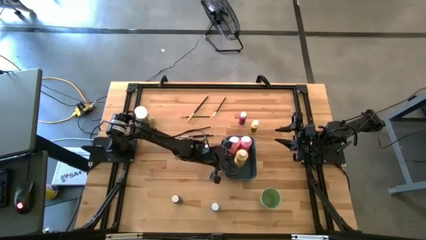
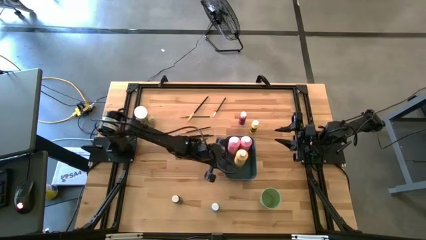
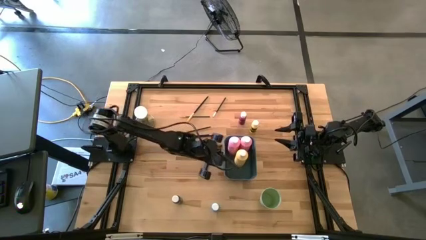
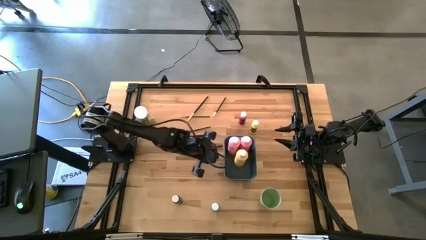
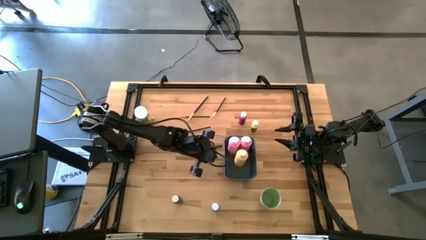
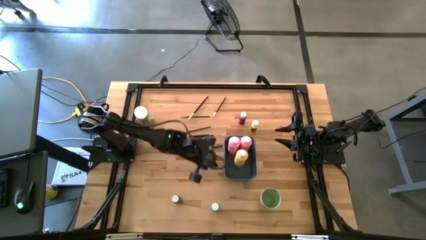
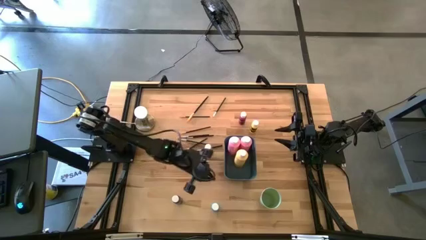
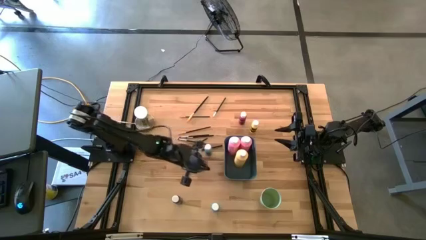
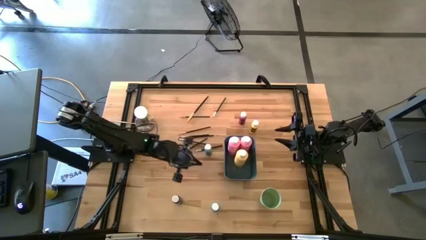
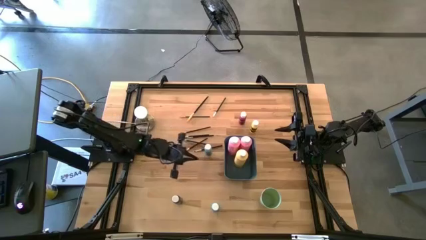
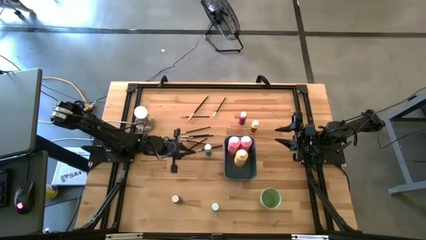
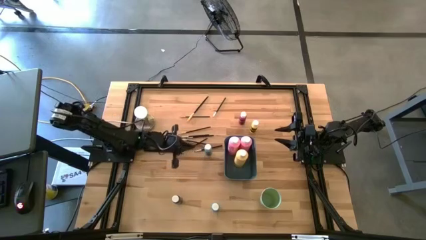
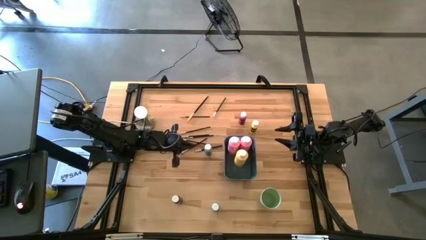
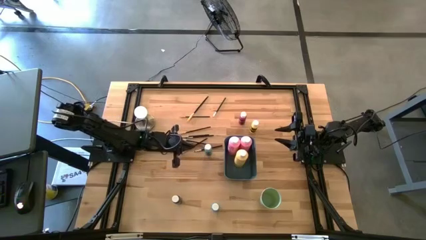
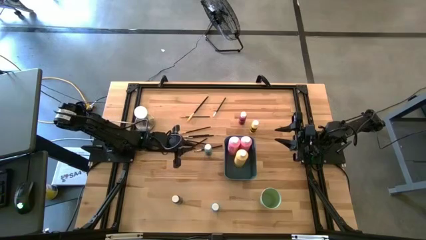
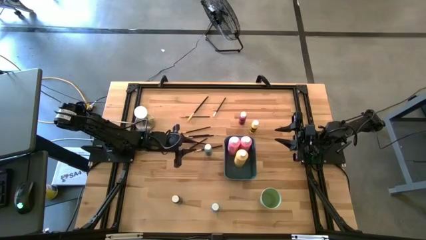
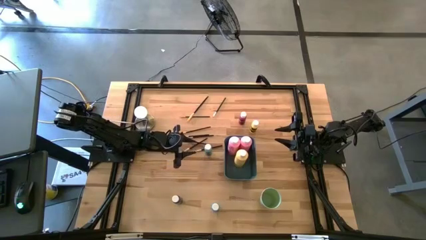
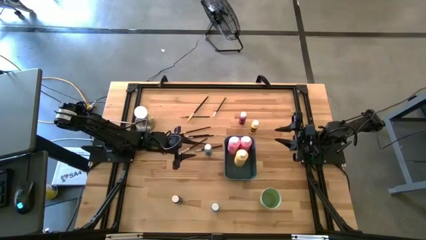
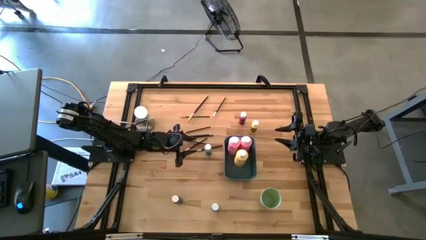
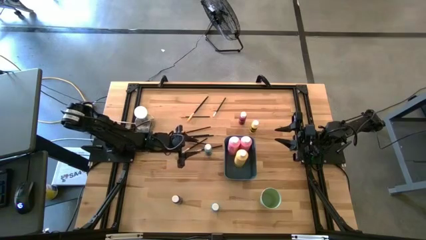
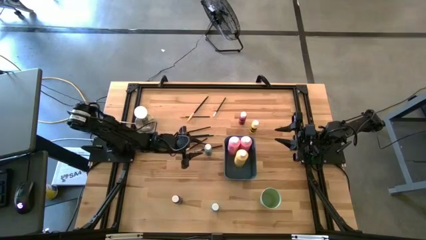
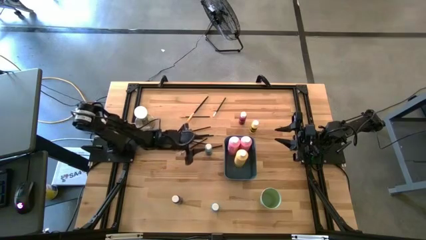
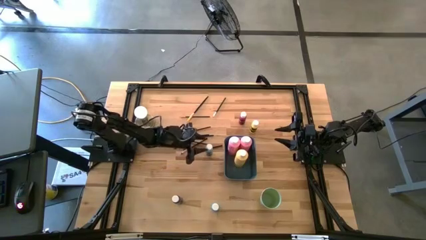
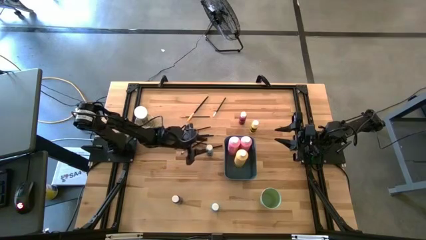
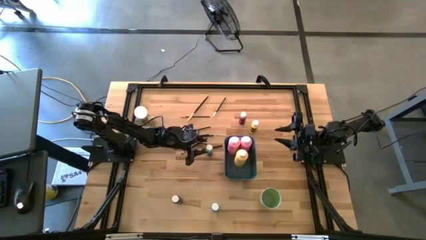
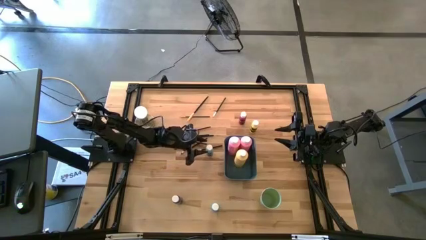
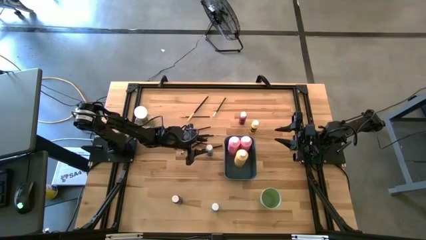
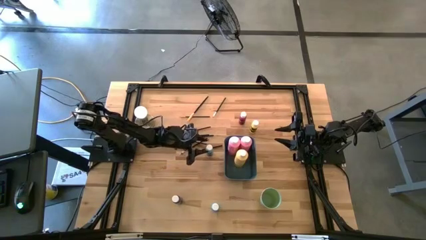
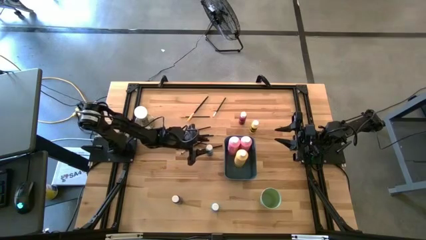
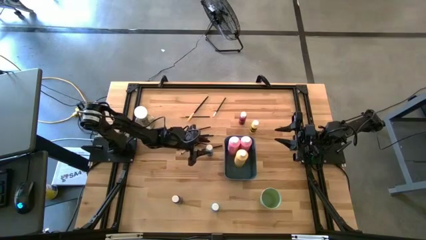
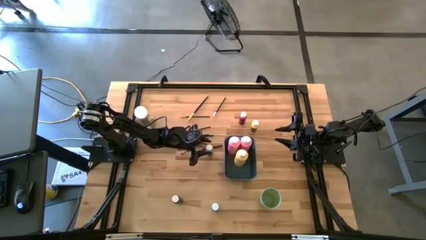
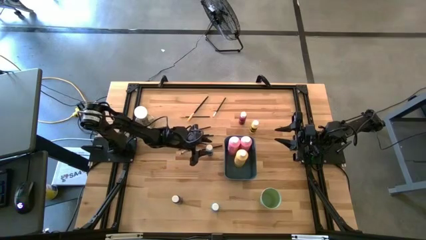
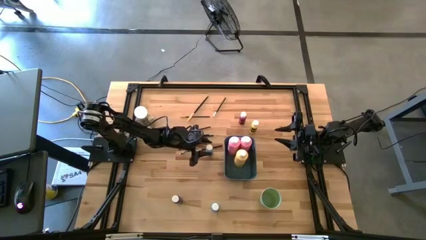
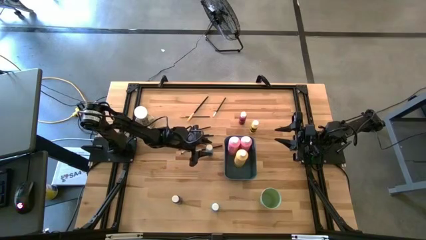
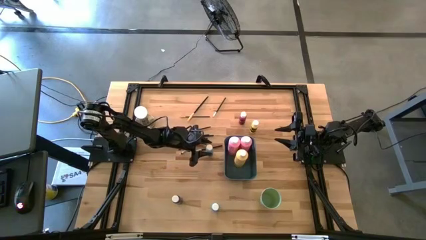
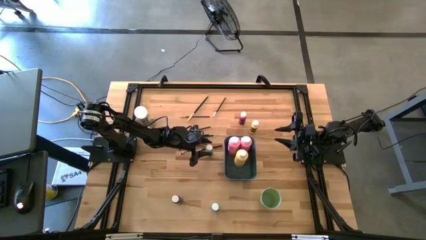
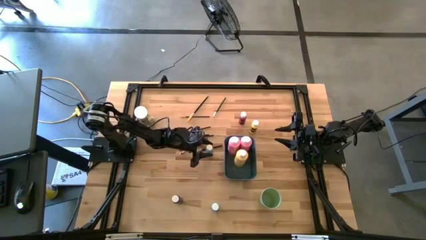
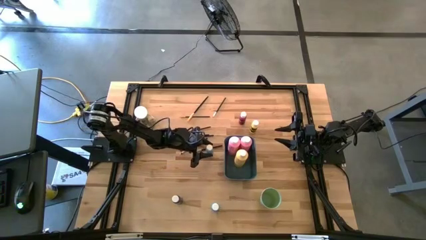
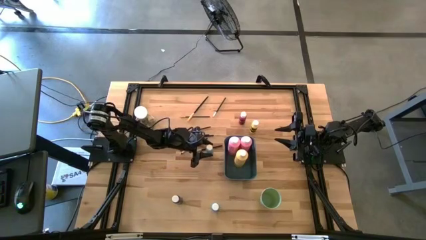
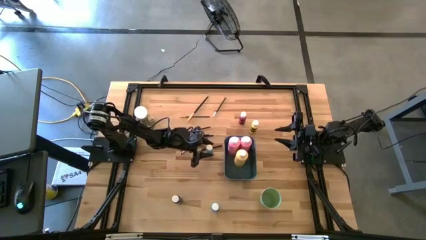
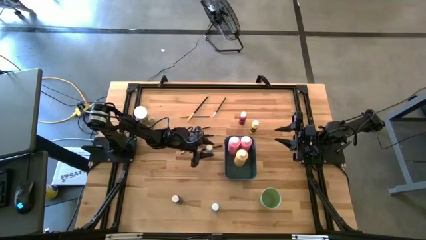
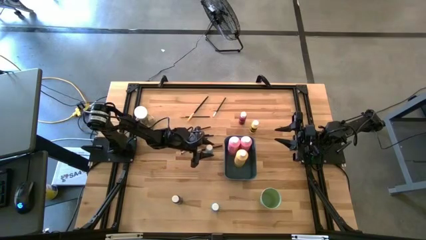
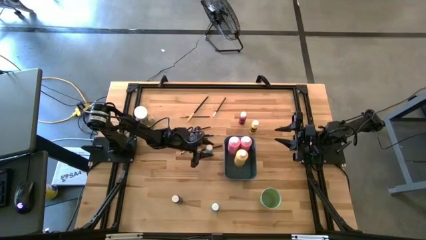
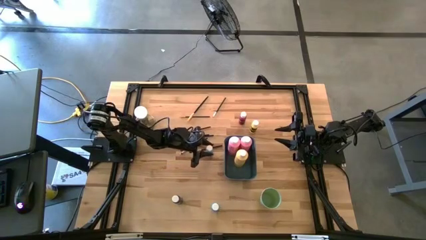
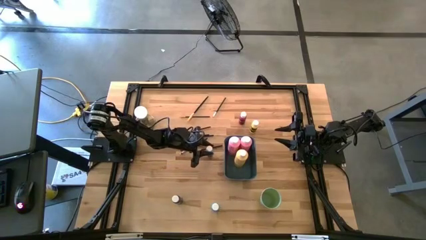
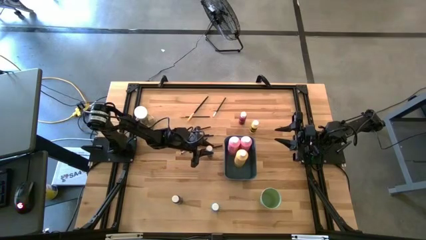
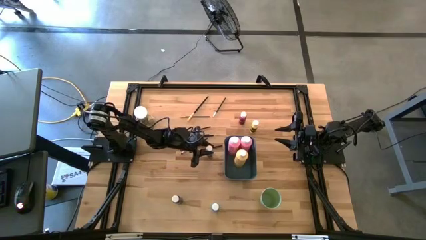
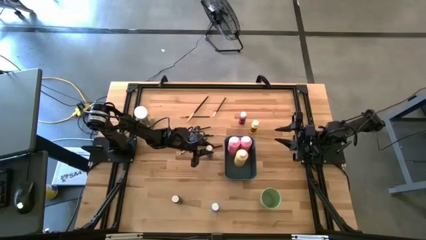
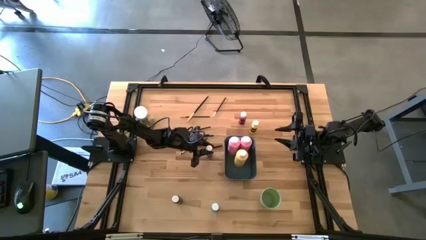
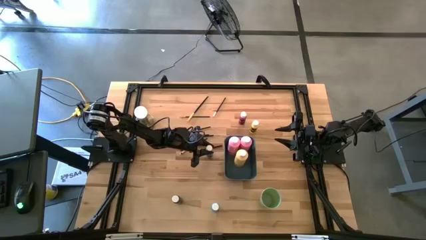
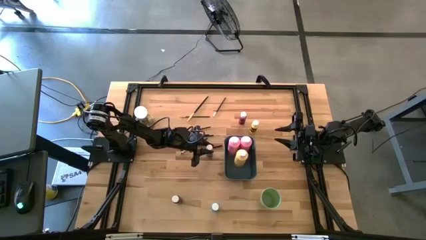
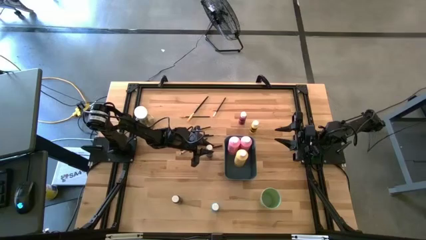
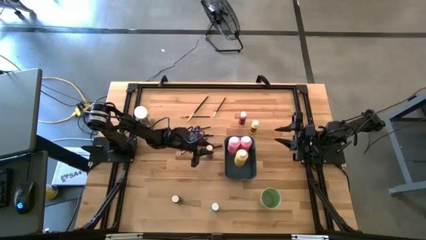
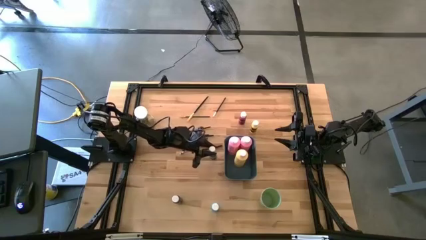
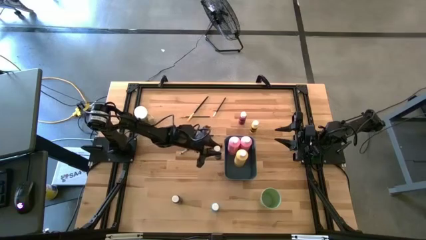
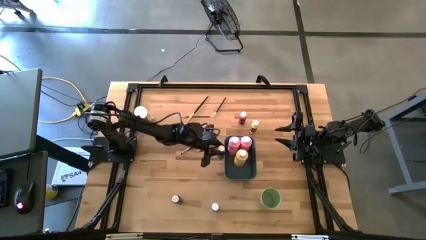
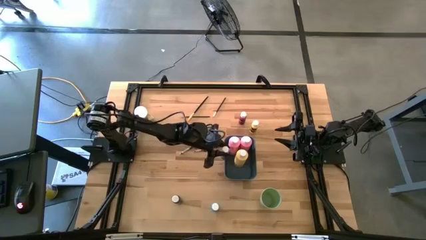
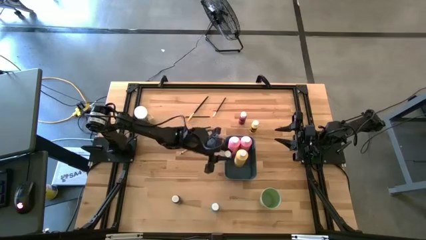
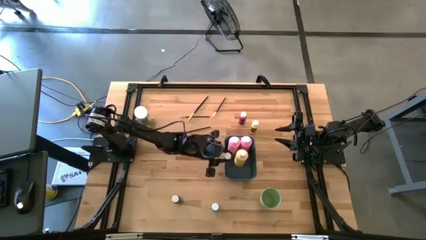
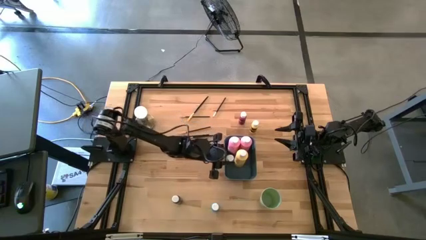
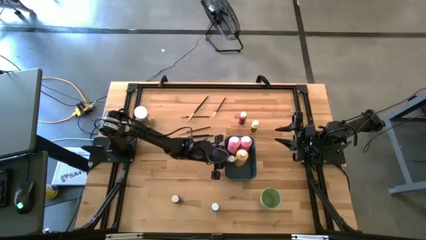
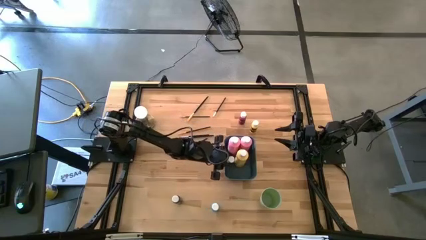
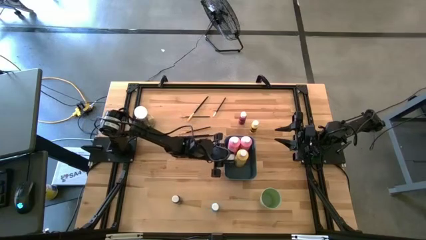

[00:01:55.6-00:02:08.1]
Task: Pick & Place Paint Supplies
Put the small blue and black paint bottle into the blue bin

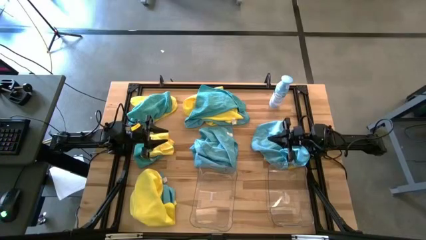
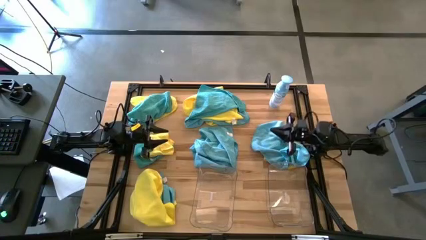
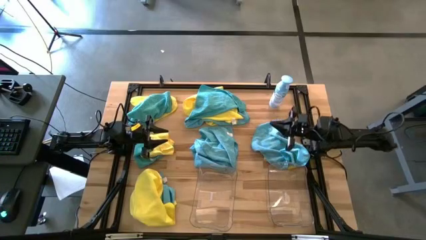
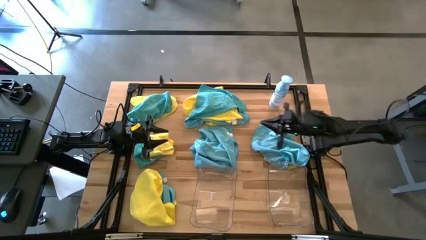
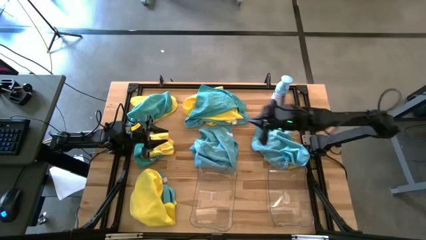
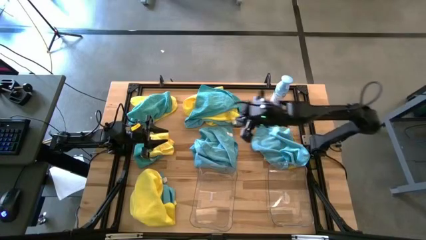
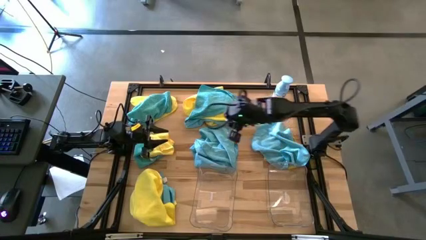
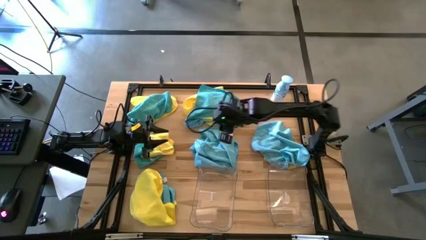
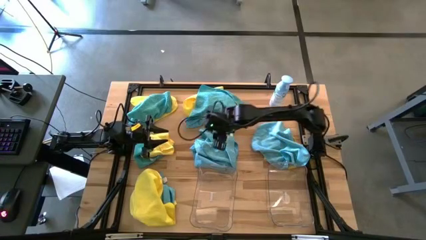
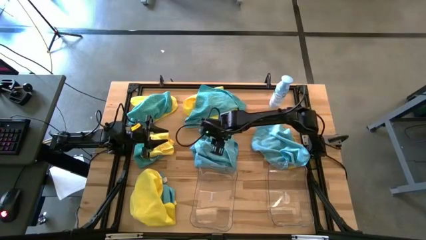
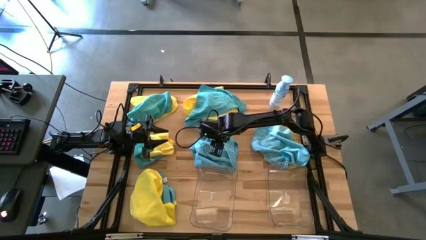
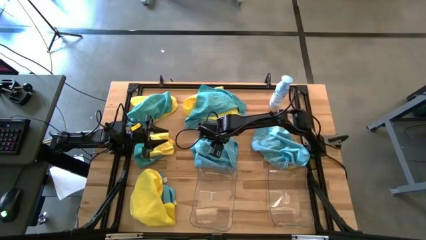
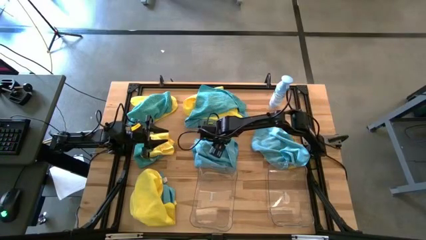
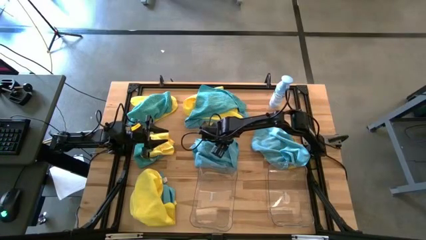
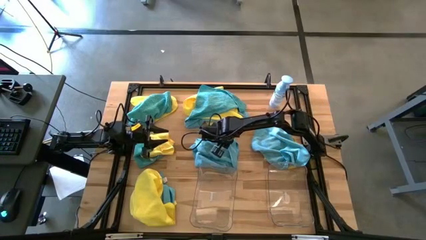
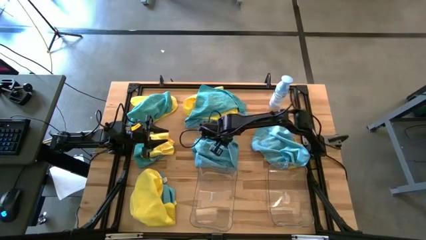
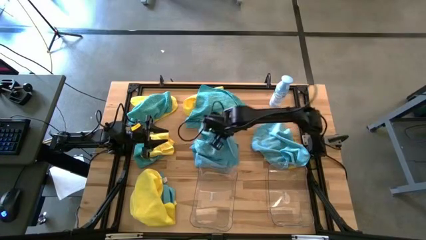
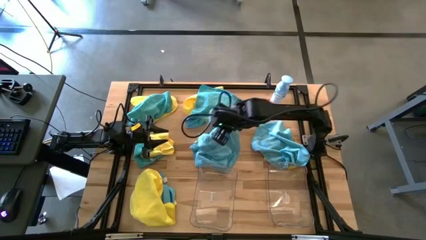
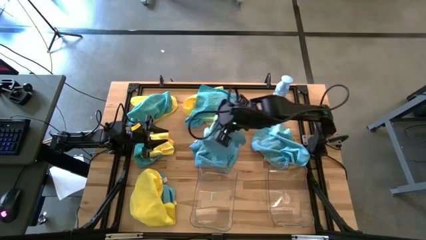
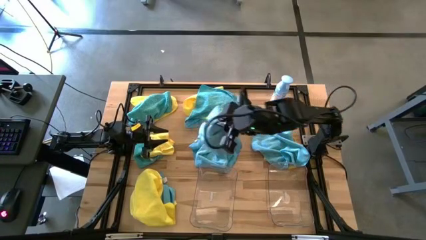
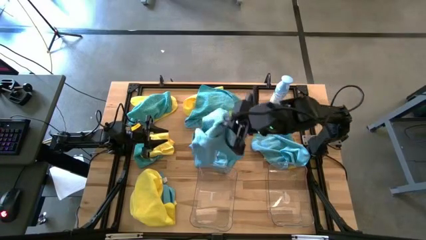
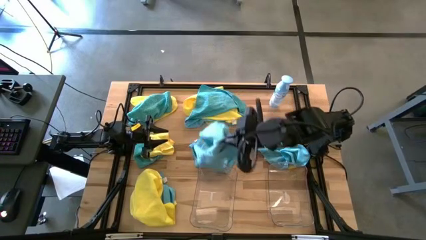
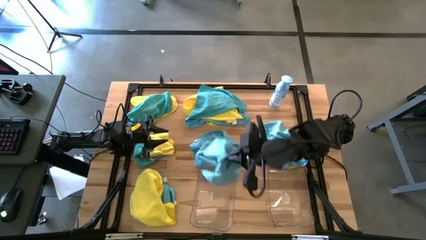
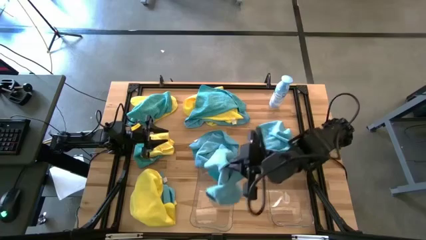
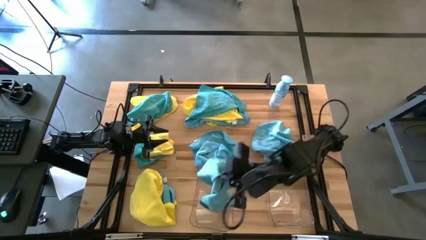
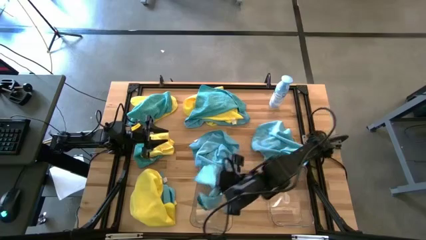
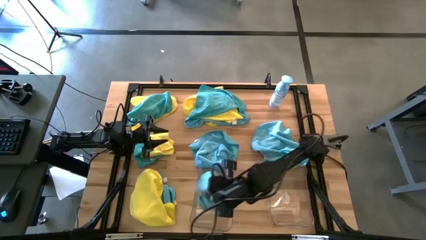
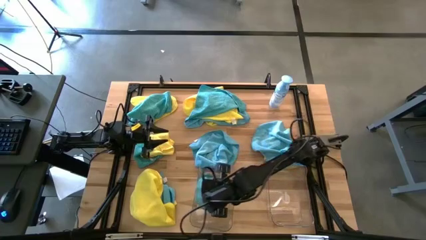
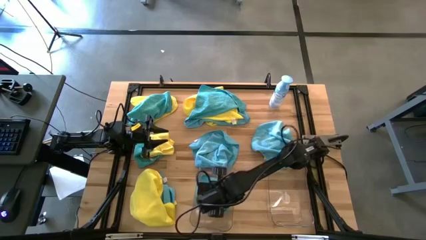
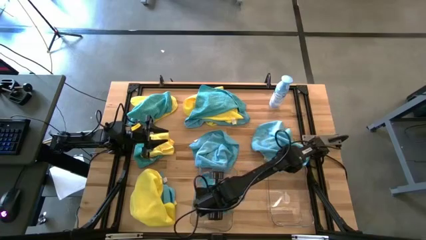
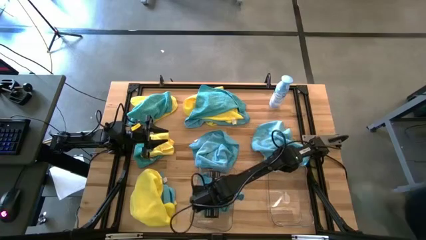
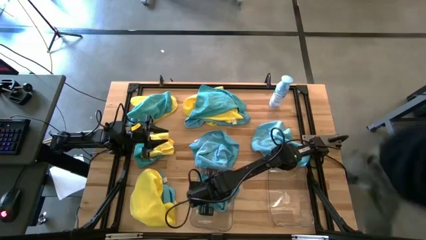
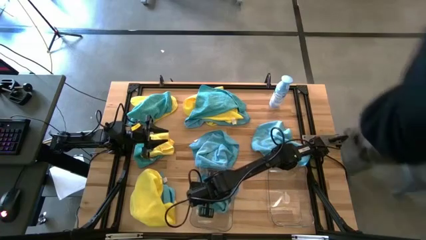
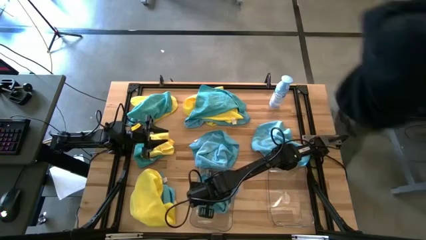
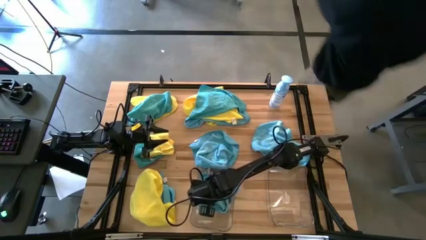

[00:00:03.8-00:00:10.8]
Task: Sort microfiber towel by color & place in baskets
Put the blue towel into the left transparent bin
